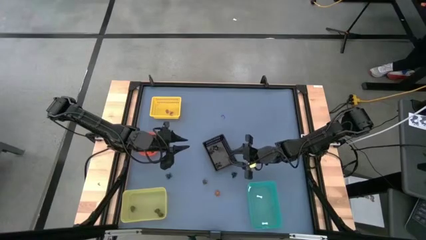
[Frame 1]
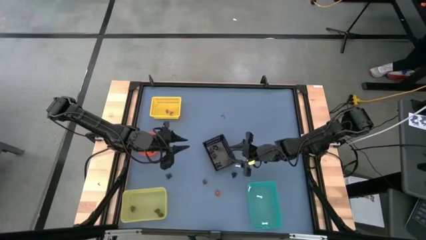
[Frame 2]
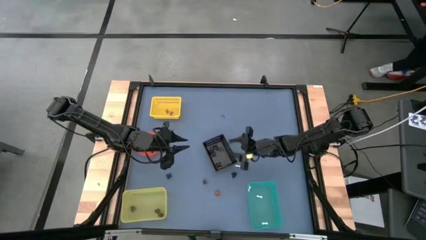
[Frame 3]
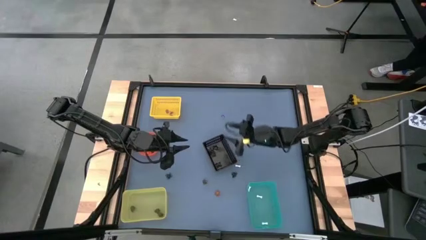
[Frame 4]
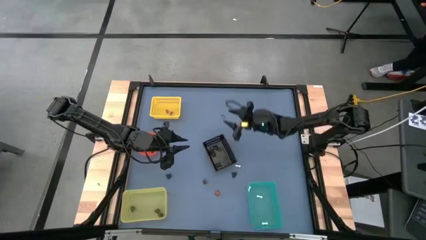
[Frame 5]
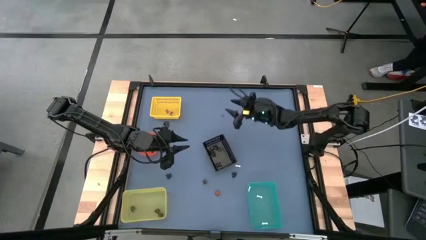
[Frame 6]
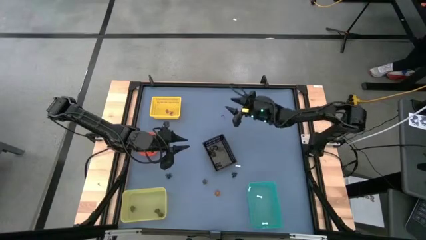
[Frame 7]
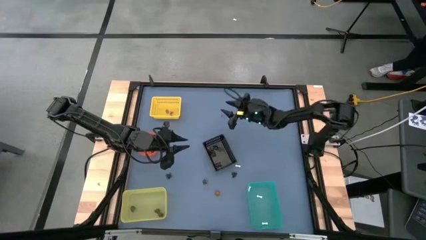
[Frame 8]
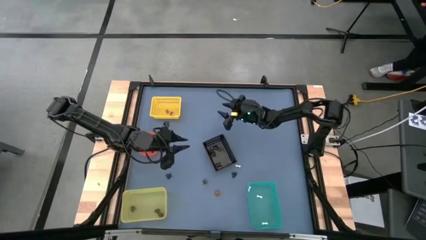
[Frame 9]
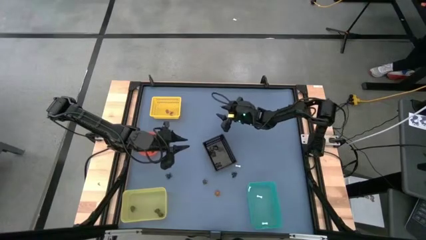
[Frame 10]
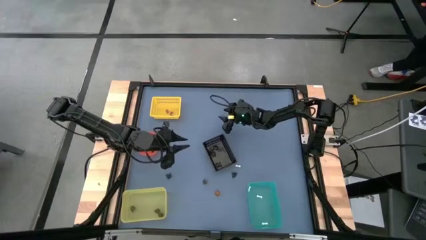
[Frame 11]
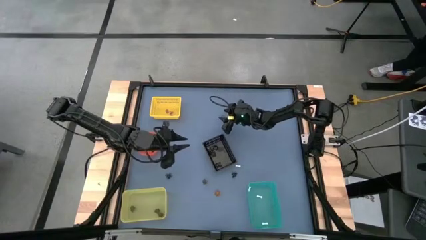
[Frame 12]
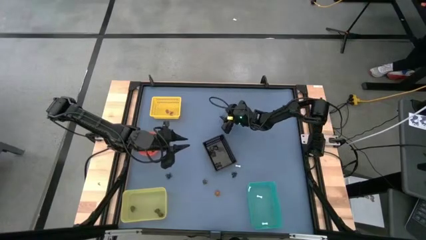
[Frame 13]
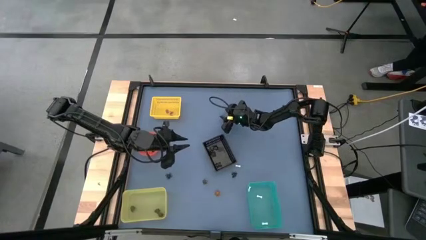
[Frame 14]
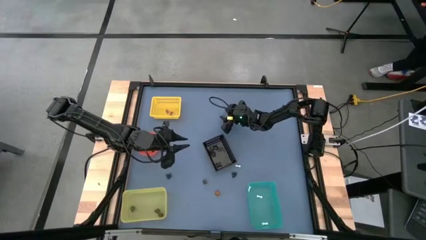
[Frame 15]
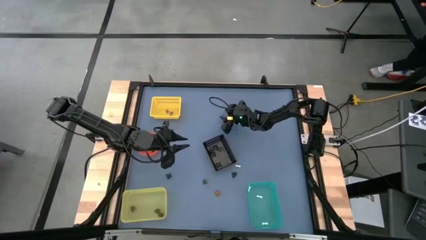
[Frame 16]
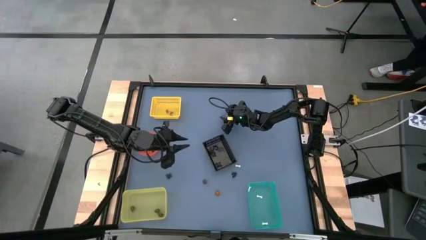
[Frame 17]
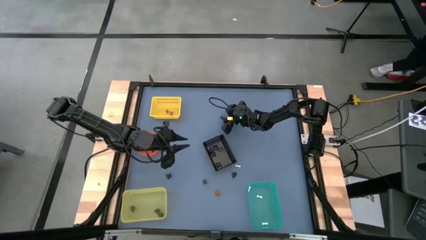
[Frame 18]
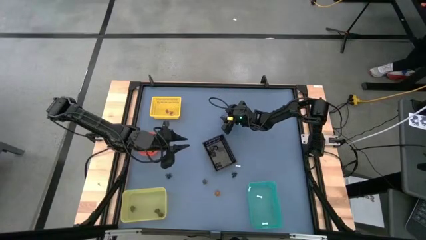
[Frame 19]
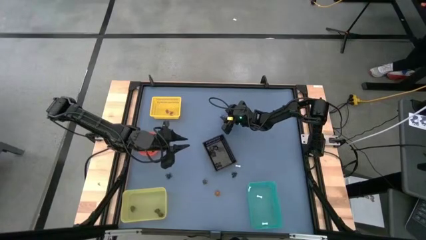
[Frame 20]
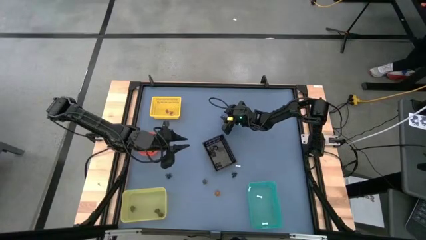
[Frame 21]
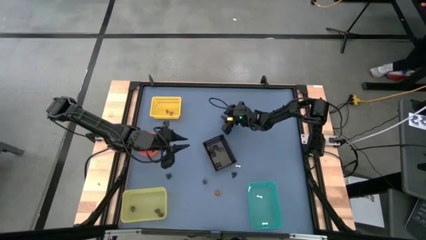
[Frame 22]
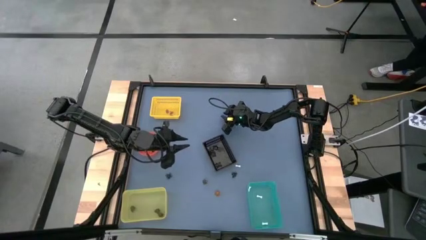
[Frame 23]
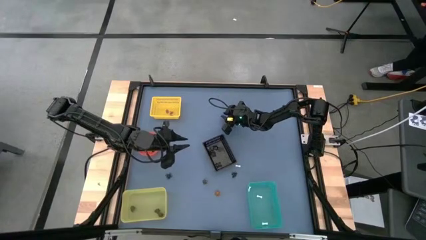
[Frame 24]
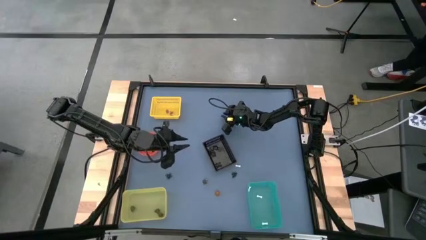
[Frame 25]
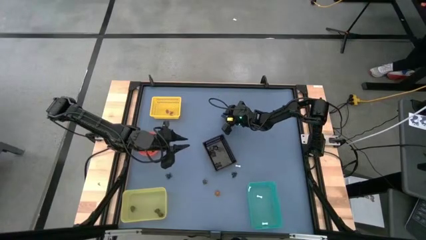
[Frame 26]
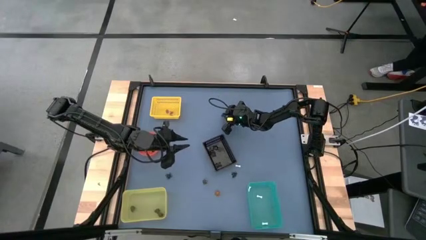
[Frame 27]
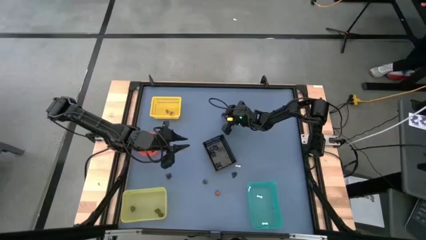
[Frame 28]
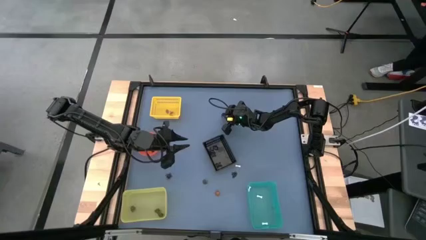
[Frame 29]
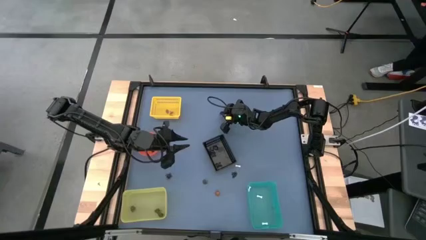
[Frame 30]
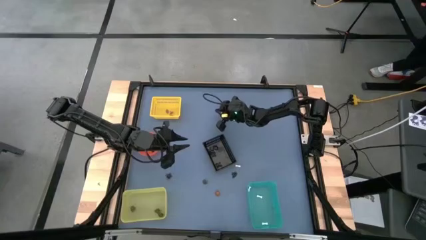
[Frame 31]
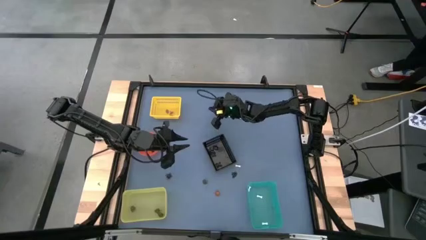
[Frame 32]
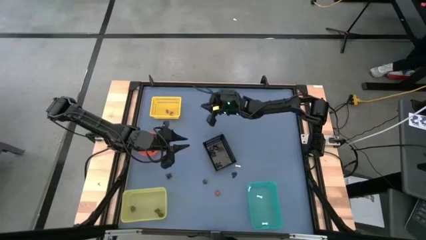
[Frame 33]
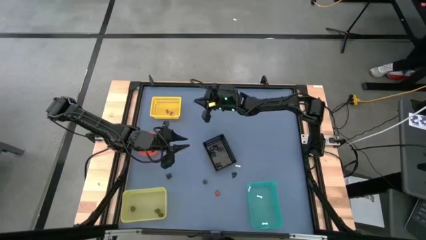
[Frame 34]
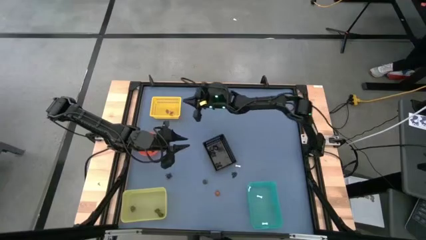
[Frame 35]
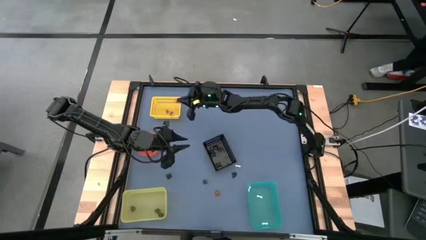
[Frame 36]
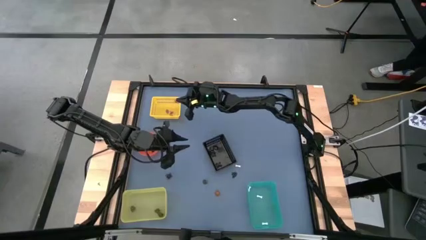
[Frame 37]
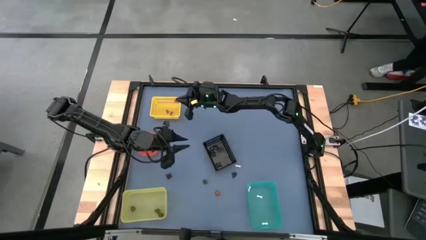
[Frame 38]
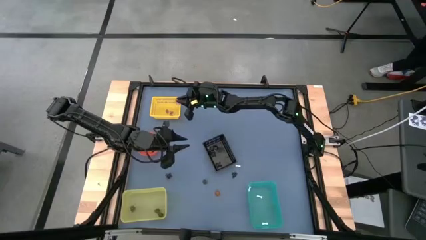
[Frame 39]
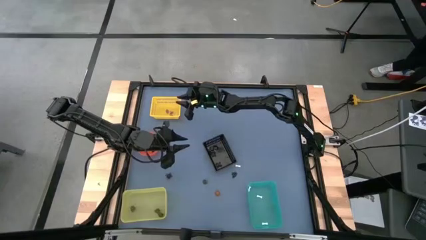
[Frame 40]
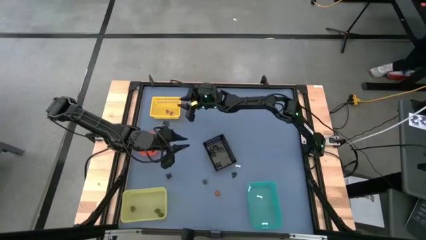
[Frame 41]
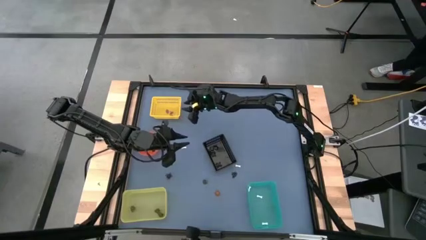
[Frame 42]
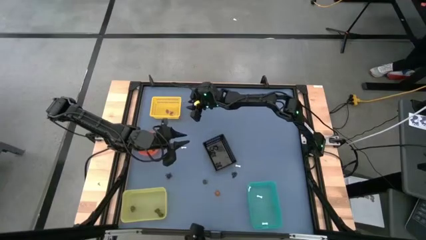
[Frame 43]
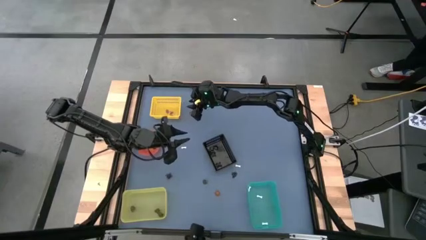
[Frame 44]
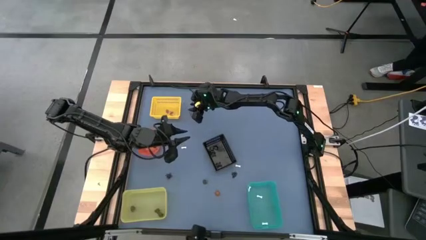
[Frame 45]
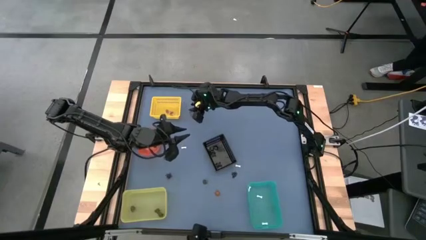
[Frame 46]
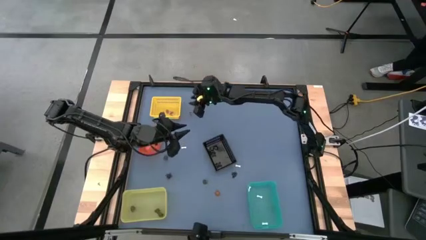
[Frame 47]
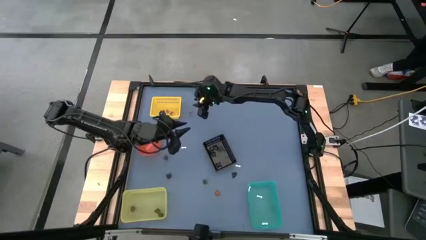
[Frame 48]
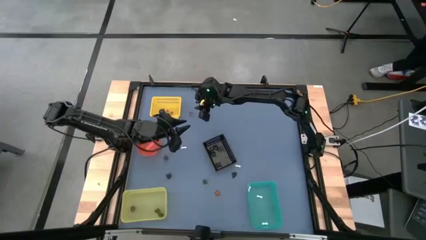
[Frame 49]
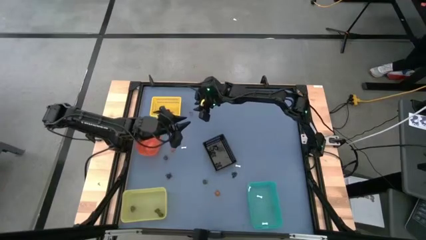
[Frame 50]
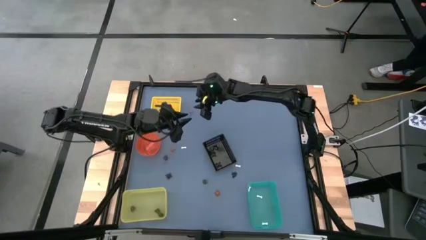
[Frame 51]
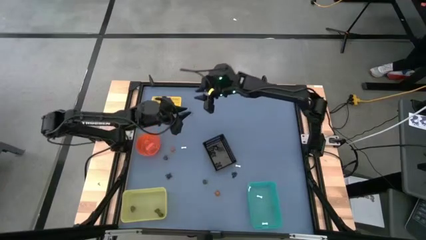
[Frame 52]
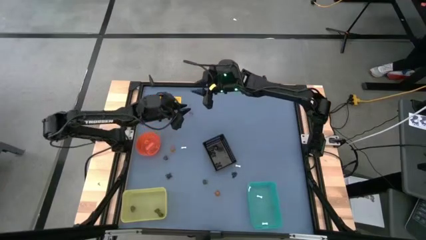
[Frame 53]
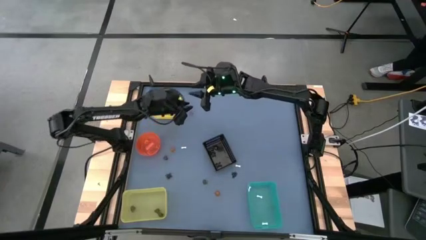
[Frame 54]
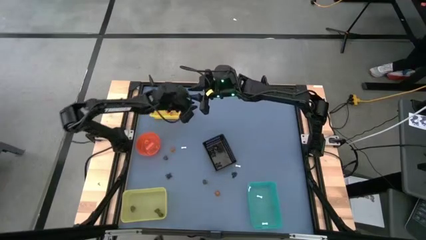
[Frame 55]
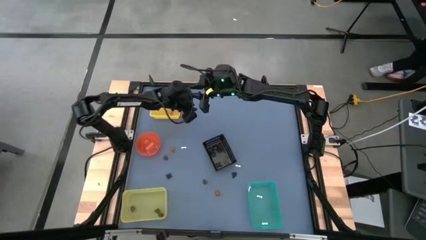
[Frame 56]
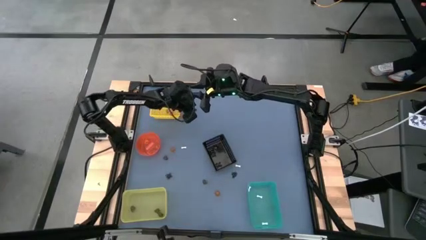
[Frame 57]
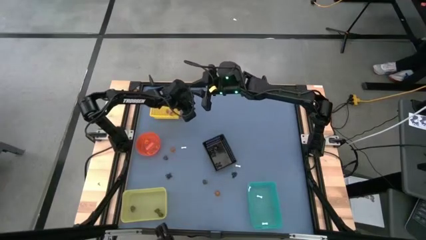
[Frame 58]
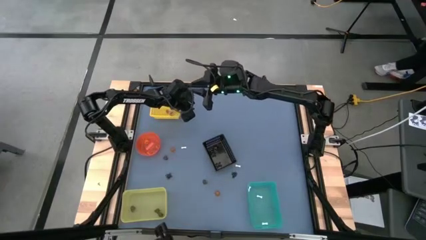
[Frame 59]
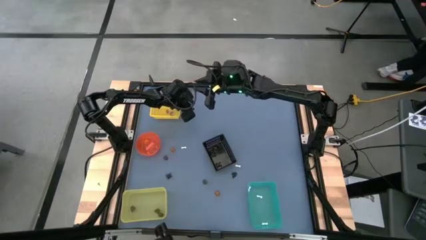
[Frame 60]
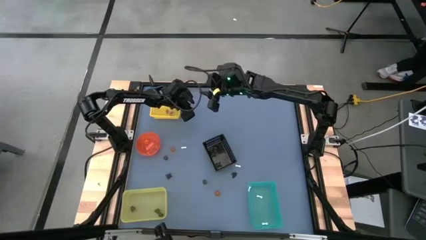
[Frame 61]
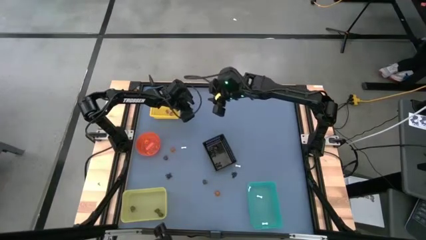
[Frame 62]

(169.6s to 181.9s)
Task: Sort Halloween decoration
Put the violet witch hat into the top yellow bin

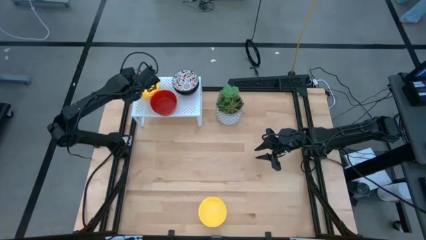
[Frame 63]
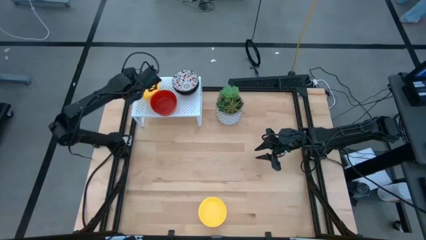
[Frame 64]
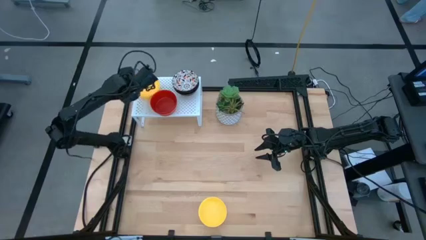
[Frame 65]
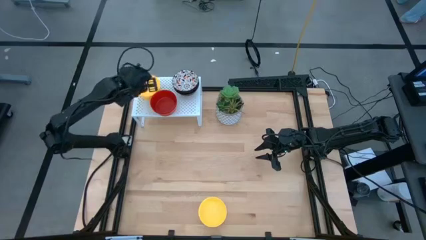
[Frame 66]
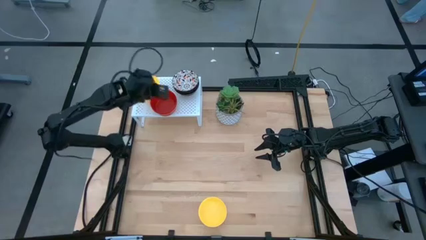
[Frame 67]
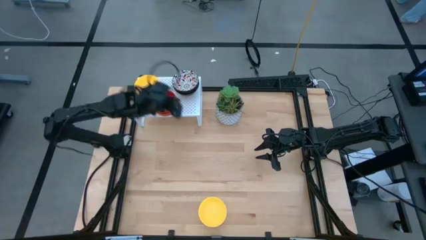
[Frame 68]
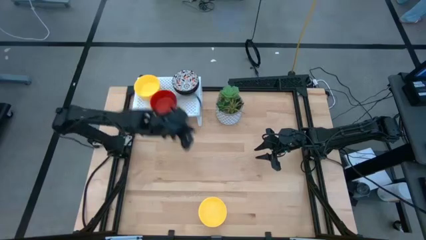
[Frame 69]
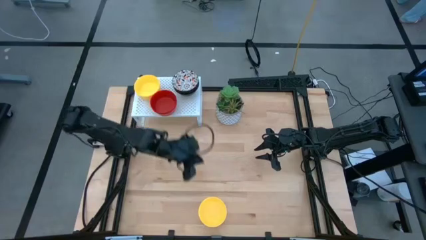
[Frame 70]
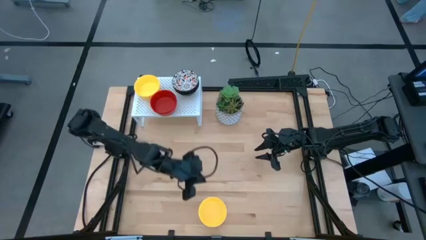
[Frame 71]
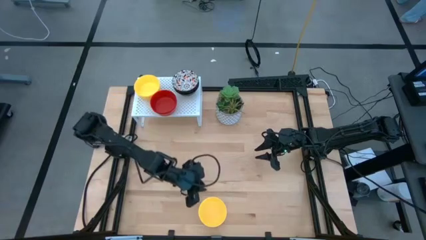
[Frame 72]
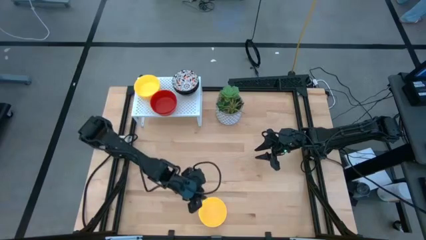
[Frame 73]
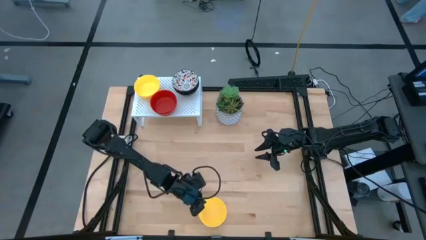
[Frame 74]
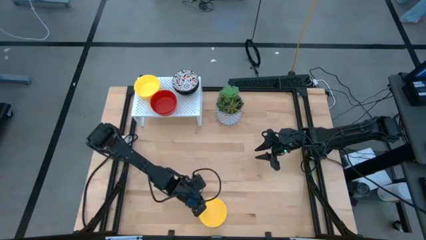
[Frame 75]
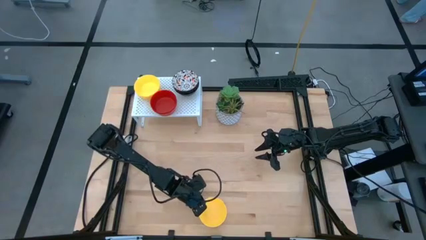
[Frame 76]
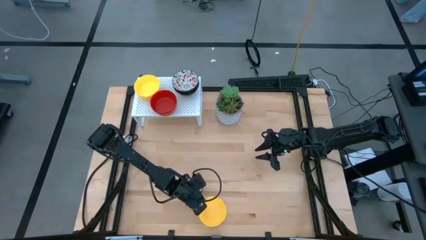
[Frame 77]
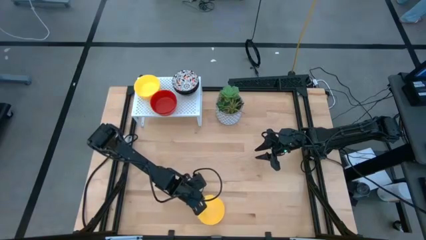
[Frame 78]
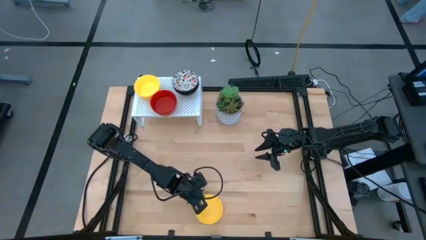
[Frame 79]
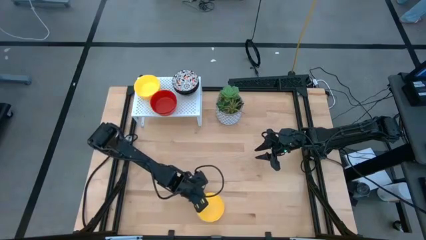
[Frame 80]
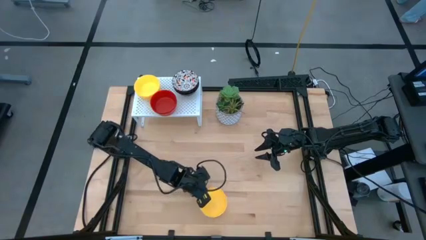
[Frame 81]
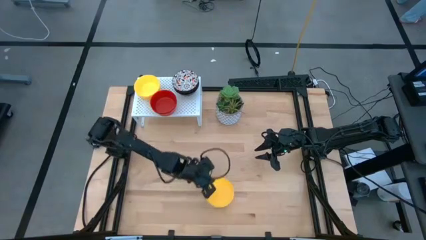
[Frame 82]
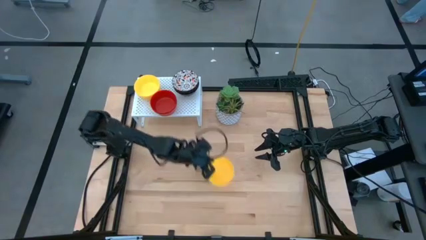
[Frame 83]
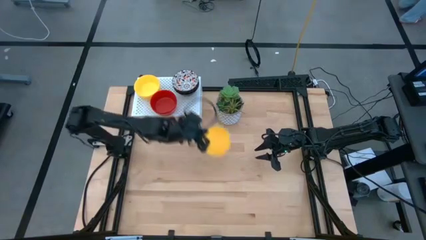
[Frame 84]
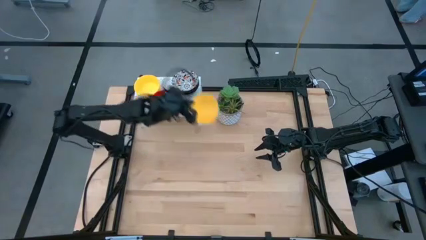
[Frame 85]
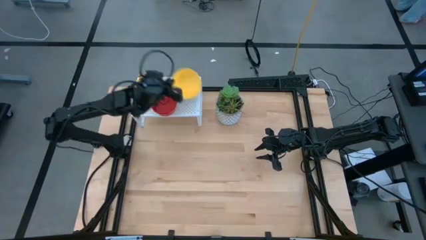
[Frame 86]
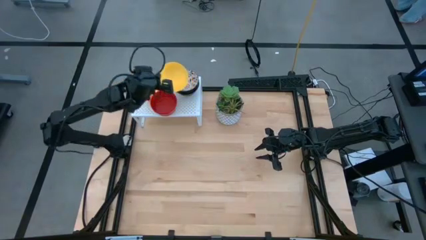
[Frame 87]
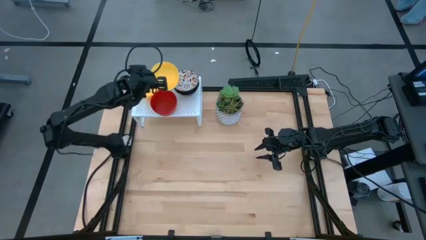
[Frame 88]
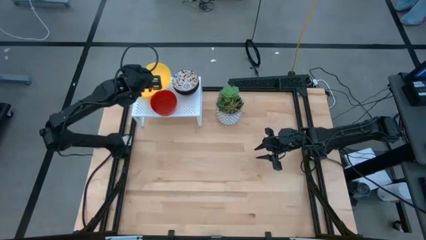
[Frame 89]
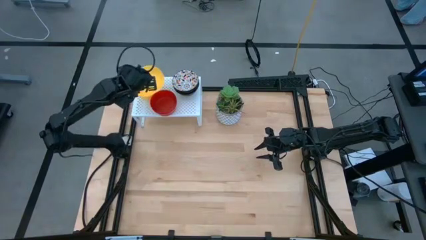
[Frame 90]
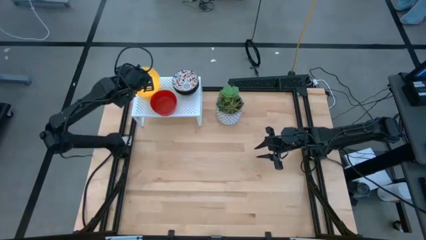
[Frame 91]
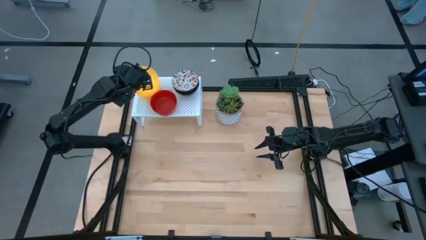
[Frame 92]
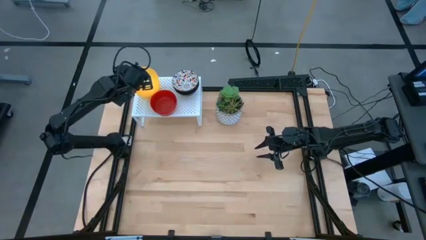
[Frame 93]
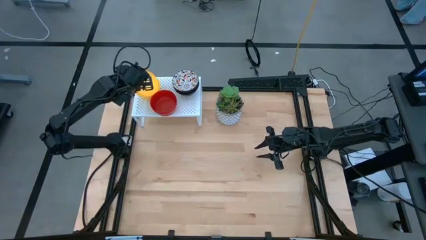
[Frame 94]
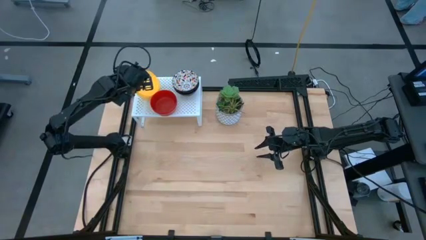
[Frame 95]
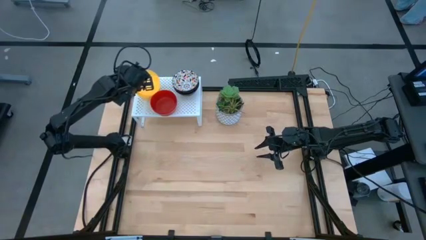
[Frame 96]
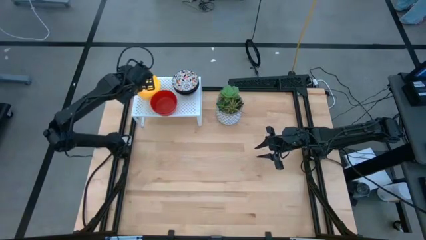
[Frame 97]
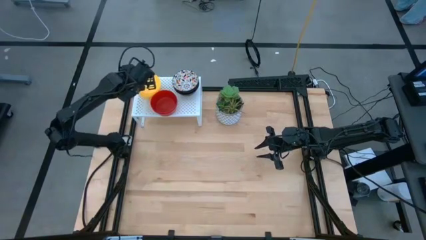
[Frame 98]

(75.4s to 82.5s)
Task: Pick & Place Mini bowls
Stack the yellow bowl on top of the other yellow bowl on the shelf
